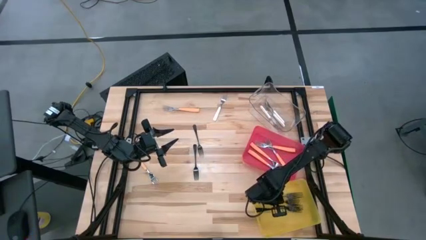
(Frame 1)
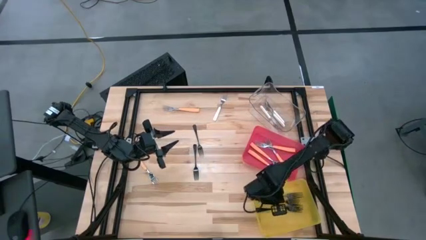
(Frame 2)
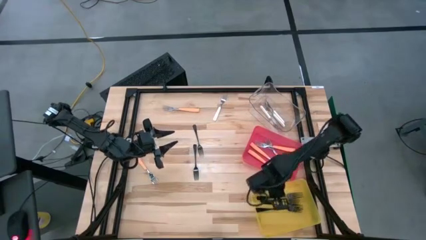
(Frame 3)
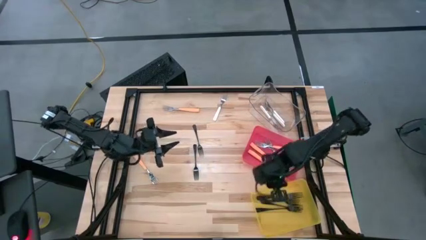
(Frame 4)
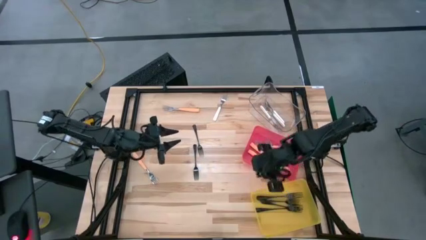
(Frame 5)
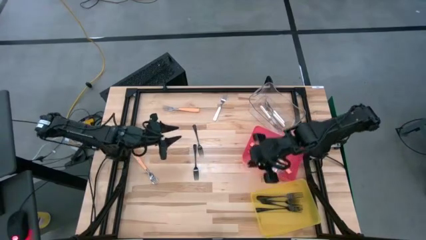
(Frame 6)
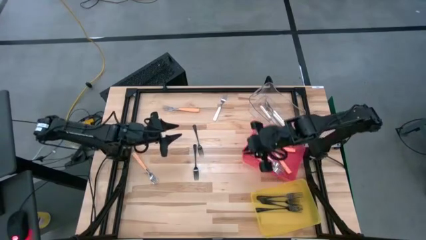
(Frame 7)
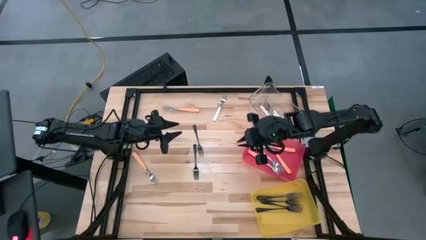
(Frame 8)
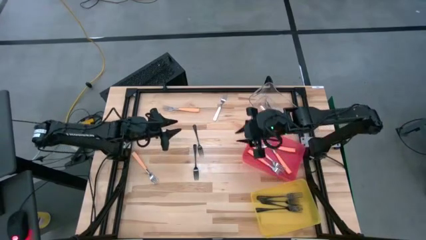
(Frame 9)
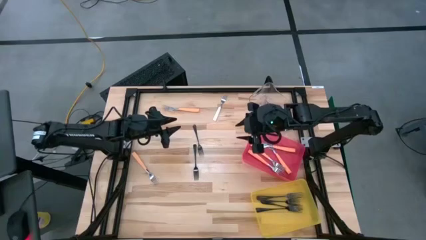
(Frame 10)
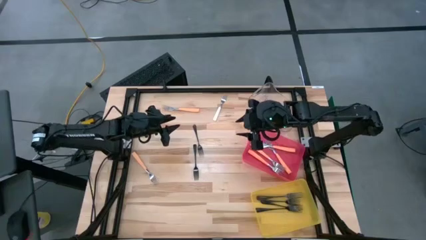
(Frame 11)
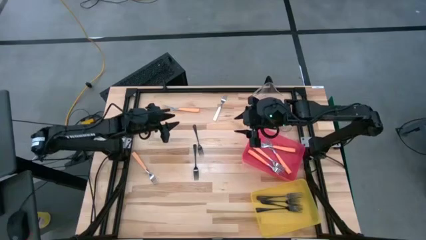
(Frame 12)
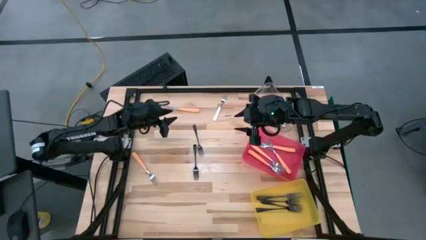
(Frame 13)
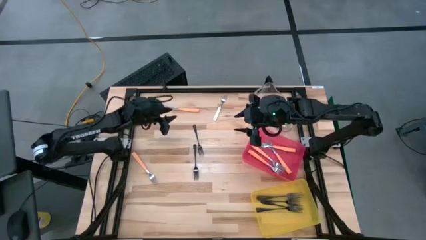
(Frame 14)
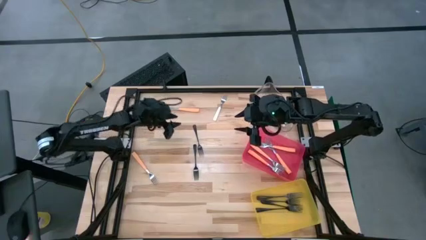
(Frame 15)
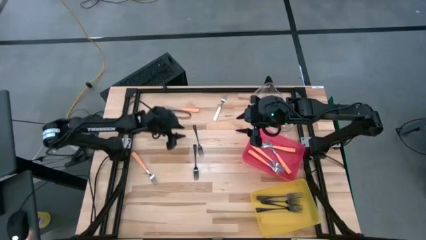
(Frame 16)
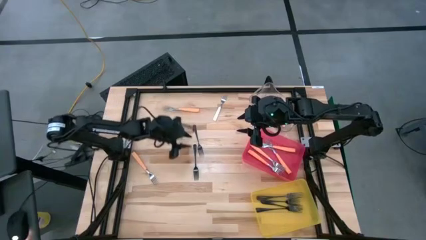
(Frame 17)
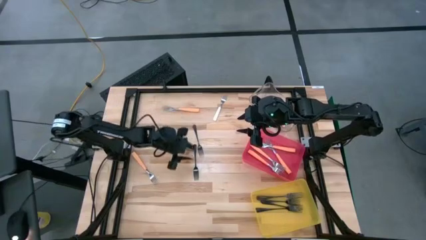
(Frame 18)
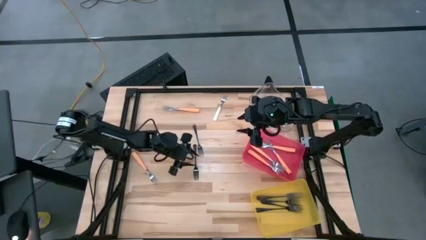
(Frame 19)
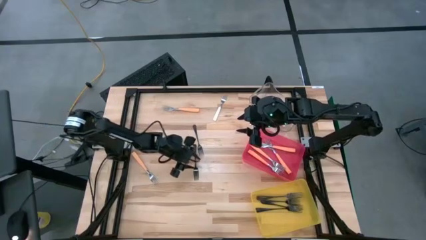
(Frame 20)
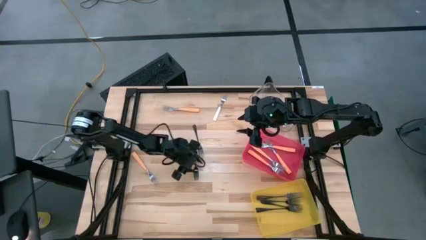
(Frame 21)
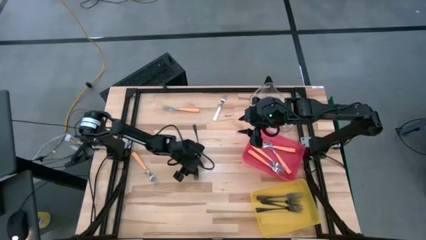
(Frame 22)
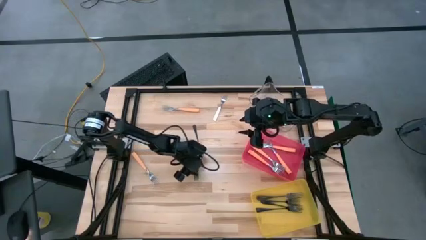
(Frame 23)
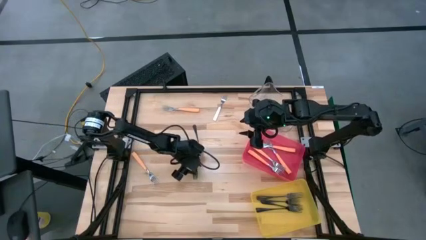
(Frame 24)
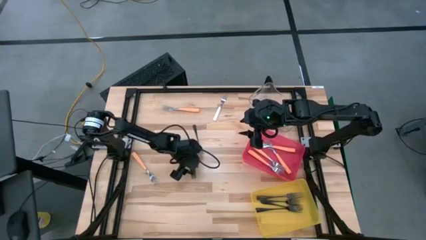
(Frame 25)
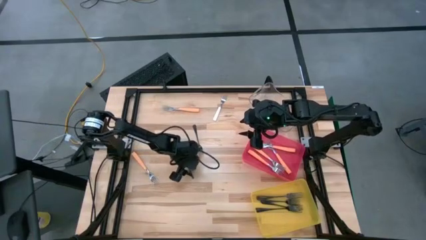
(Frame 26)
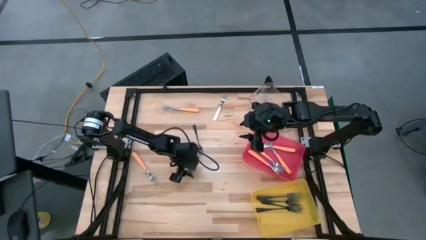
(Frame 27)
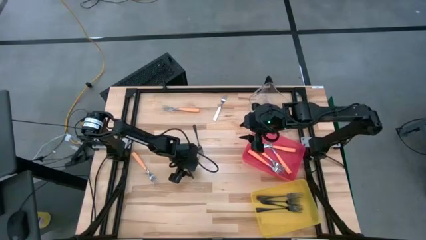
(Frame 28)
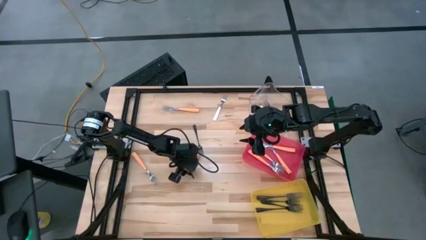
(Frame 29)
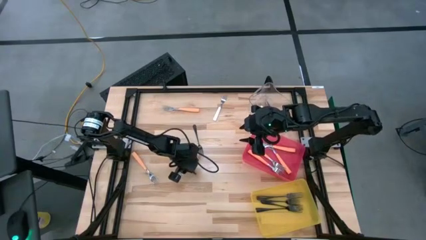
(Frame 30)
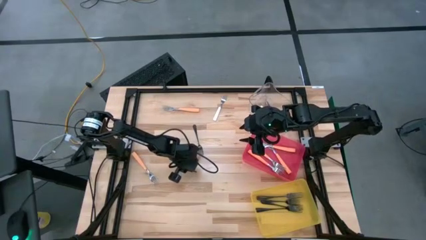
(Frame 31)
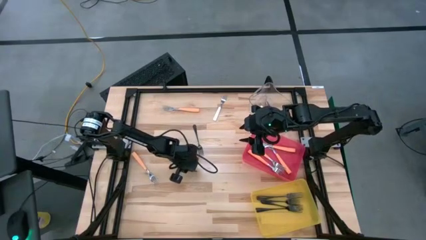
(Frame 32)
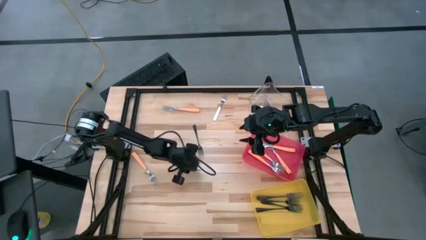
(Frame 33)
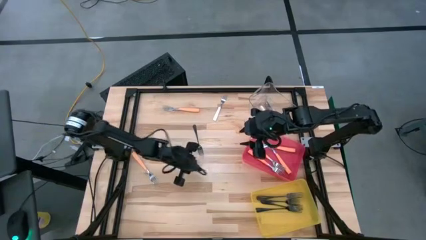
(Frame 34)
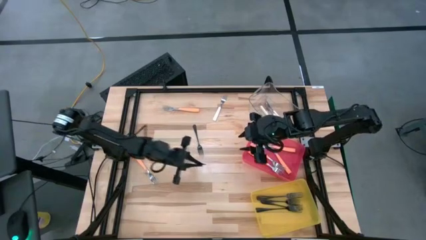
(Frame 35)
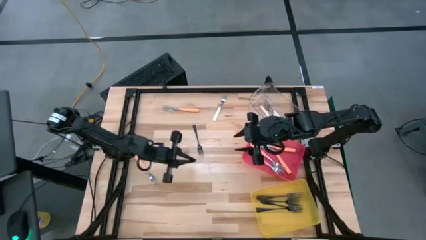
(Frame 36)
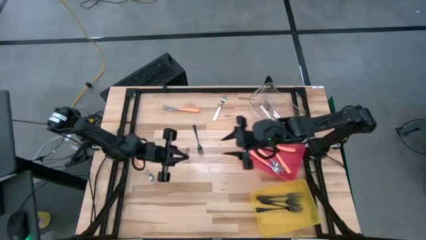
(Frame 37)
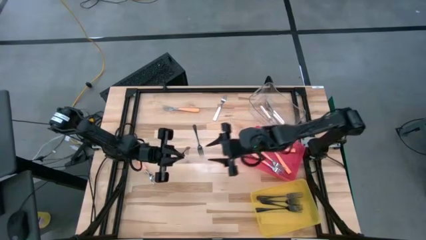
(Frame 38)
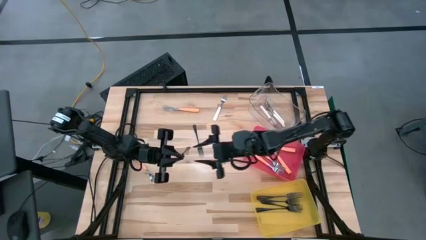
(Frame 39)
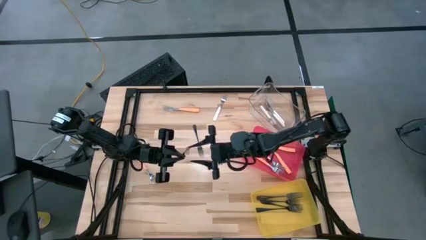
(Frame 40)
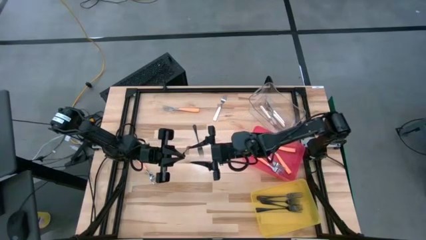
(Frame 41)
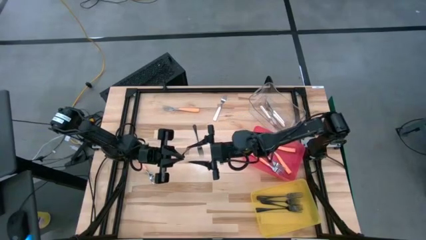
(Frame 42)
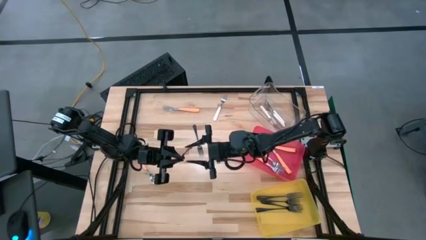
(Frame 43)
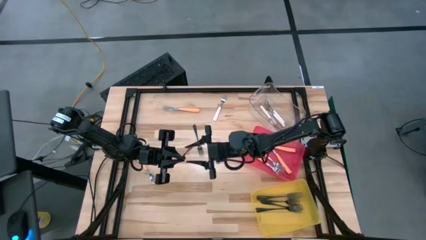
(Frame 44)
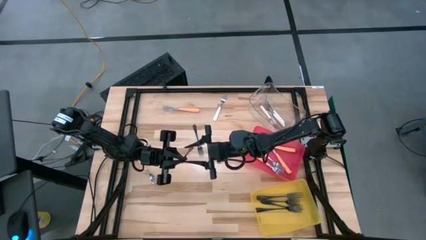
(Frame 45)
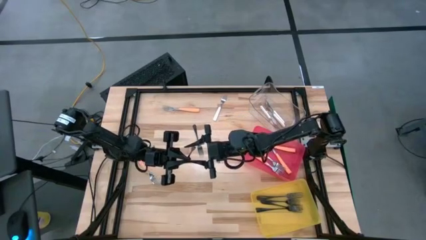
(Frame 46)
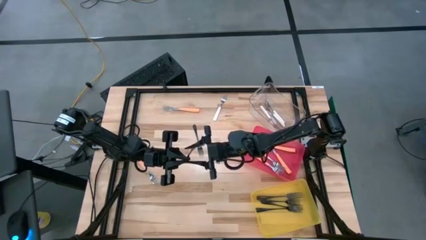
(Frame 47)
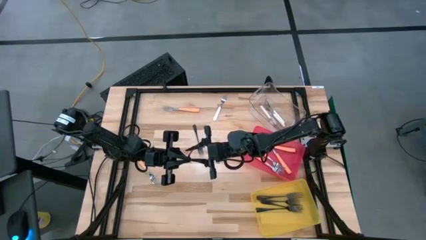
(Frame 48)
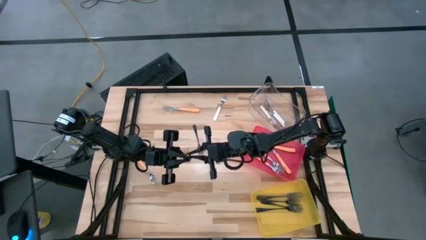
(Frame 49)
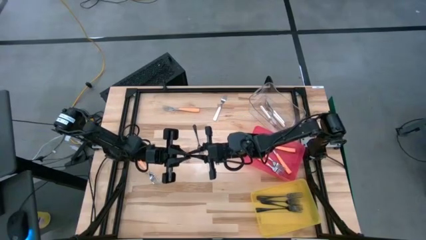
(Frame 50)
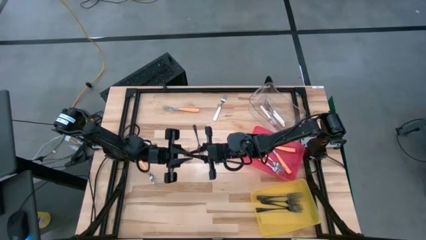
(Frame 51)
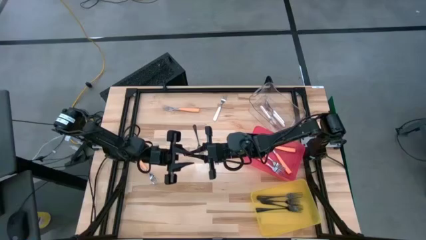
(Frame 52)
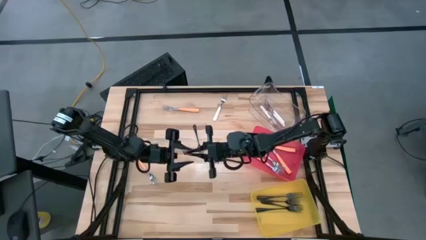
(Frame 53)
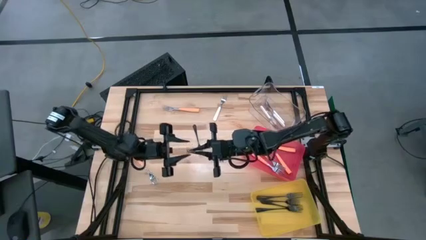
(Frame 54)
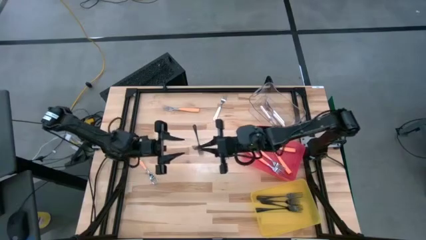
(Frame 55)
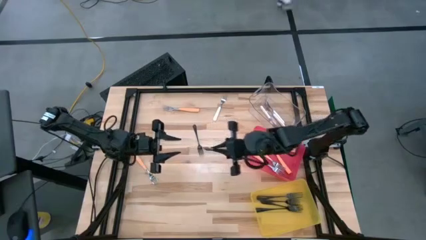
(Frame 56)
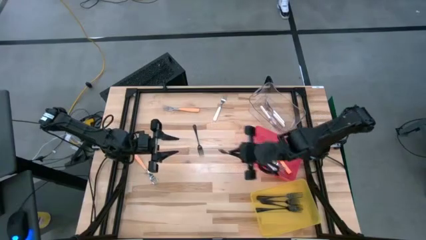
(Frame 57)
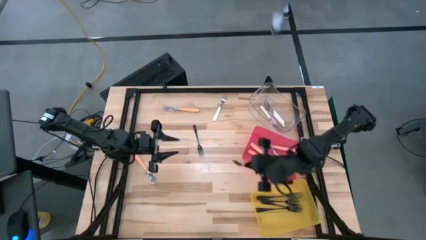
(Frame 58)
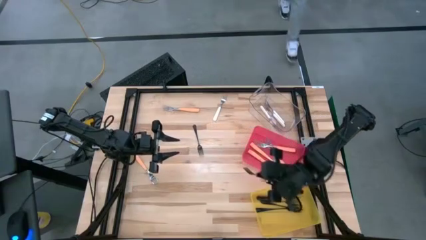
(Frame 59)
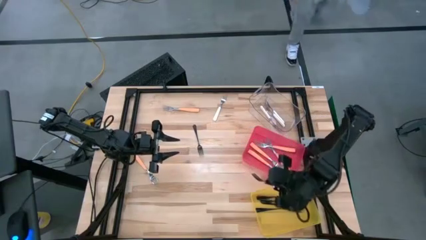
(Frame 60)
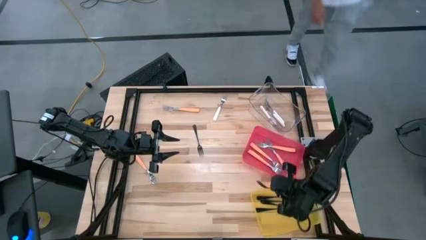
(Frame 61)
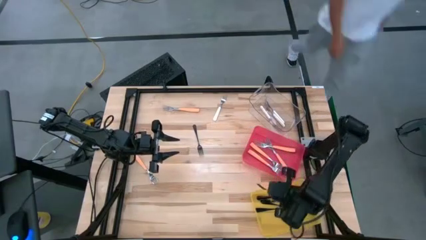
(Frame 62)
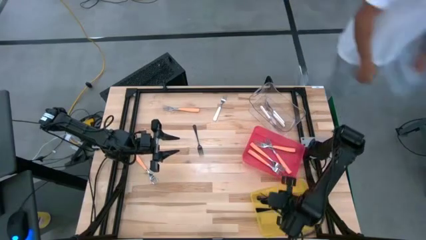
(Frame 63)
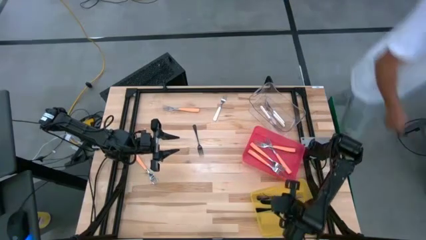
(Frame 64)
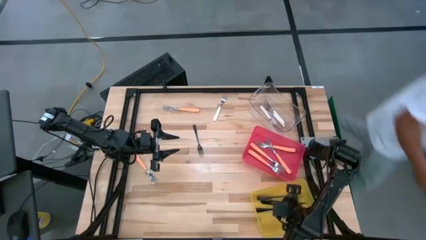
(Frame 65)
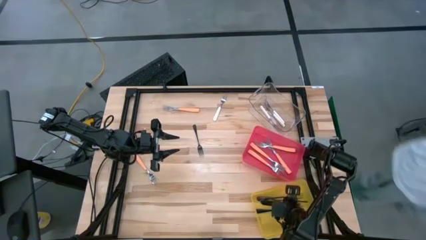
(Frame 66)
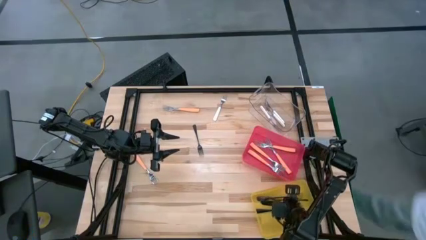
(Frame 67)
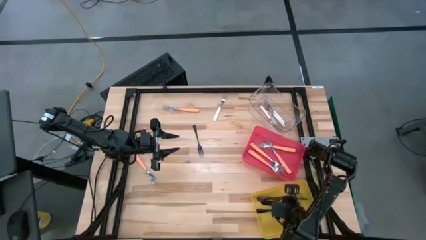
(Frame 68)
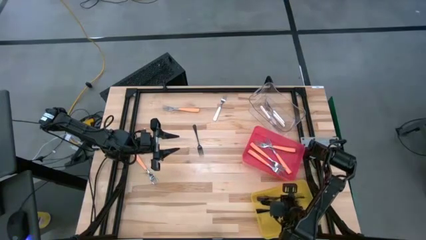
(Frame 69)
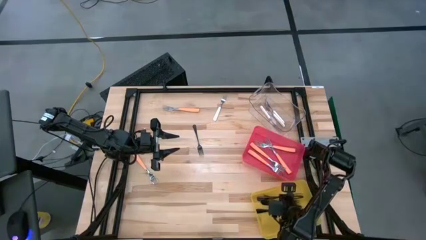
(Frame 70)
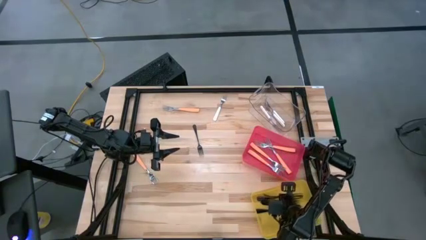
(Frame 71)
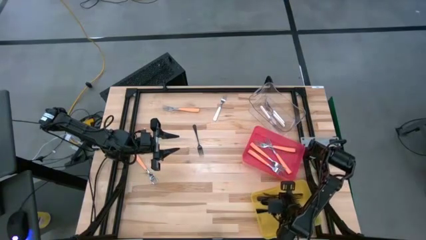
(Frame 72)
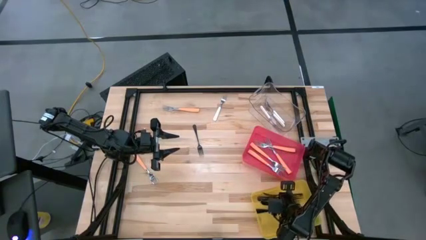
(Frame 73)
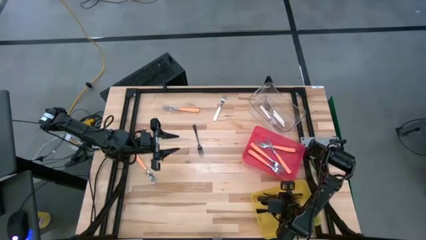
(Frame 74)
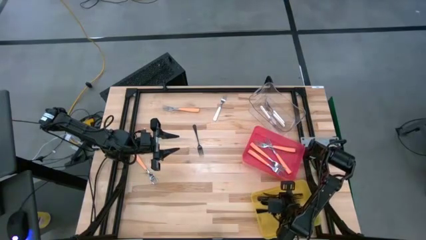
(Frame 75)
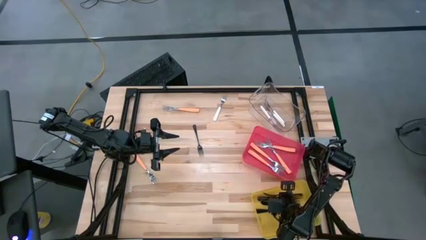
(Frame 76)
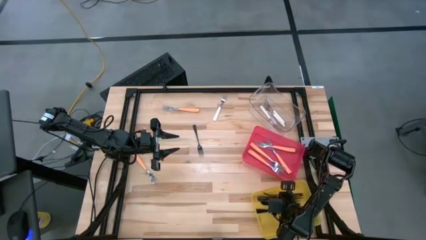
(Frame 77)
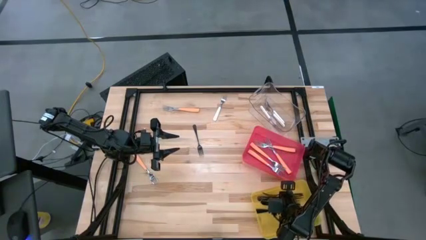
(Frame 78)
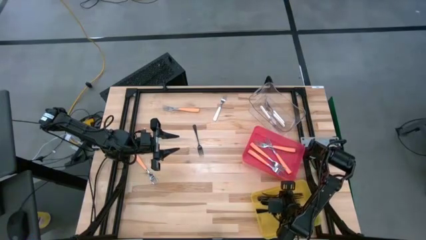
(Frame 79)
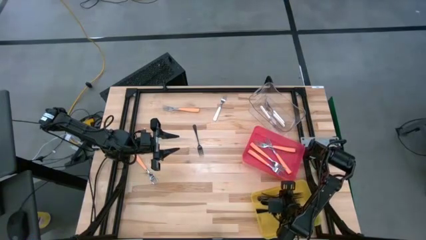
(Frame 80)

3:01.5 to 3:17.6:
Task: Sort silverware by color (type)
Put the black fork into the yellow bin

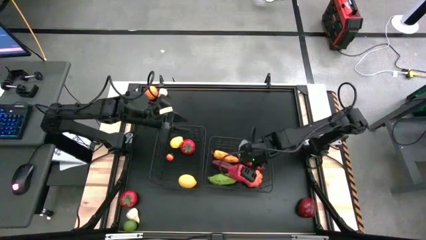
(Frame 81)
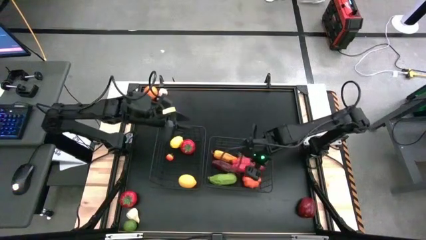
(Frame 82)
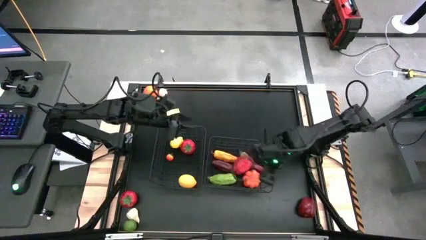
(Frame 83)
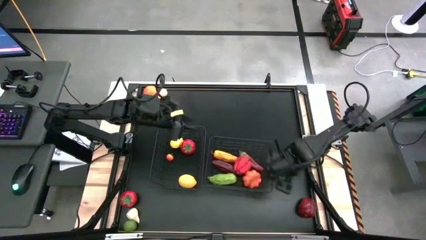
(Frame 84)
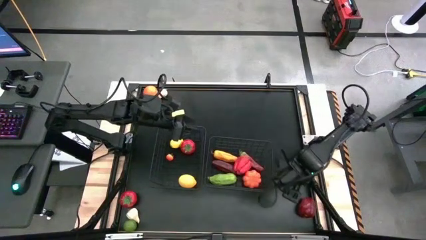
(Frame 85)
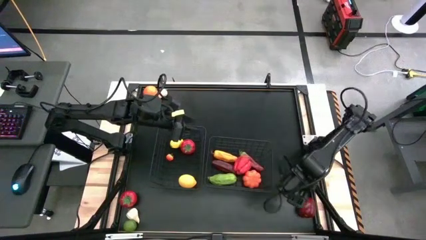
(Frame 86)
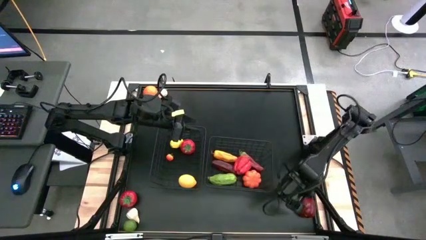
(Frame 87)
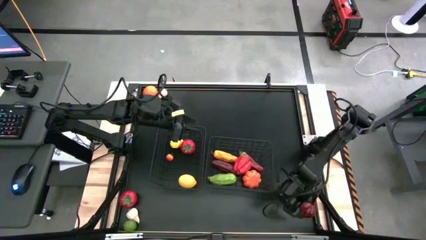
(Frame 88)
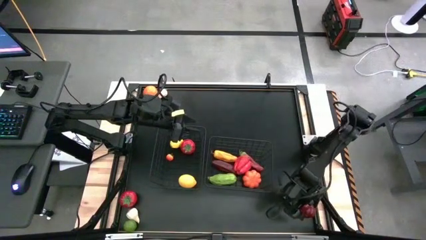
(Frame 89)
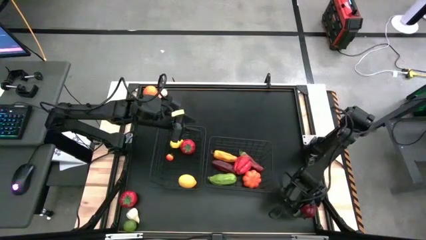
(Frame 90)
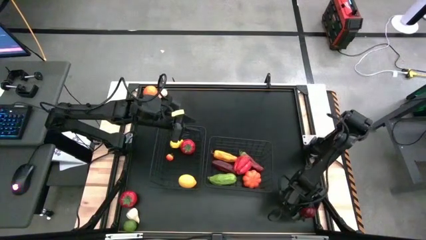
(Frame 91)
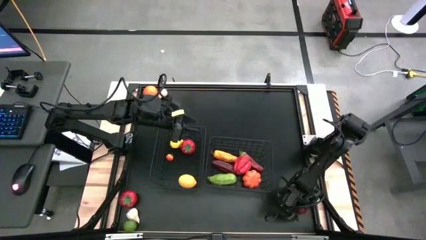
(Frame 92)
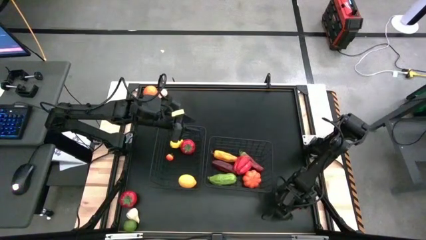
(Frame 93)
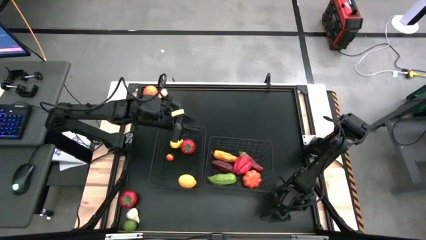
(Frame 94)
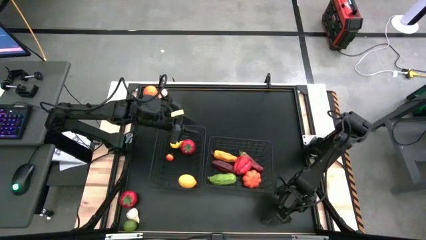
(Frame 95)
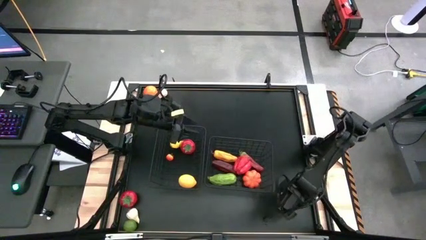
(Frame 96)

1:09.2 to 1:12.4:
Task: Sort produce into baskets
Put the red apple into the left wire basket
